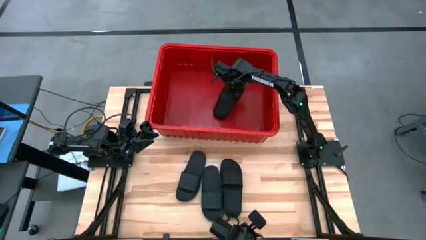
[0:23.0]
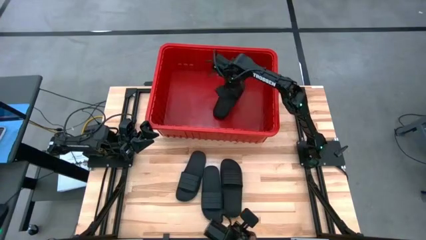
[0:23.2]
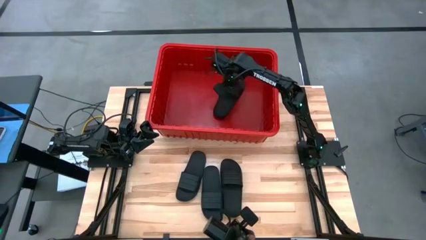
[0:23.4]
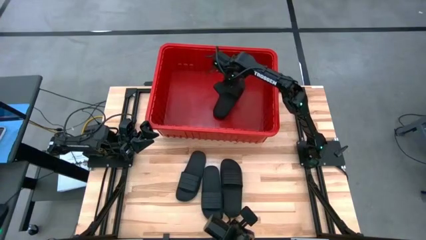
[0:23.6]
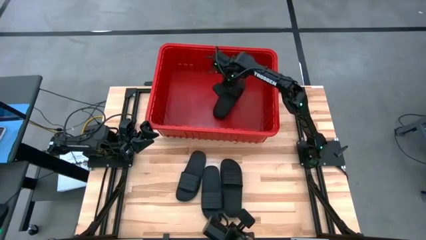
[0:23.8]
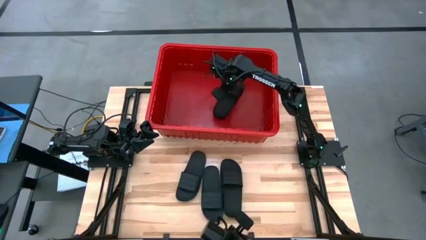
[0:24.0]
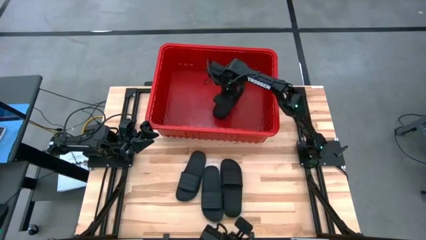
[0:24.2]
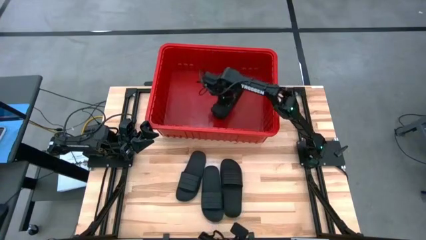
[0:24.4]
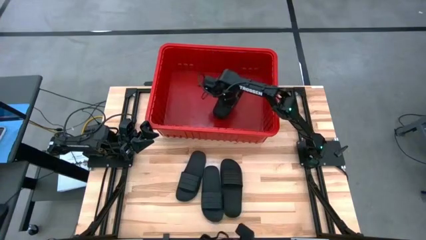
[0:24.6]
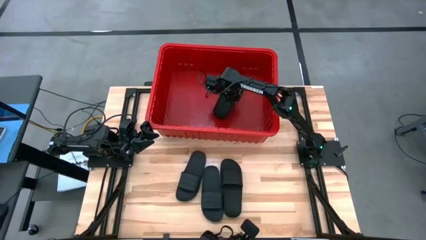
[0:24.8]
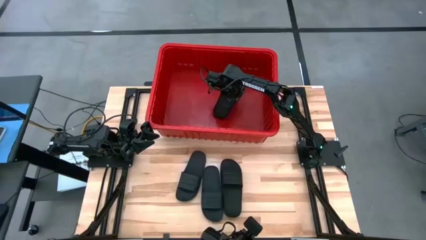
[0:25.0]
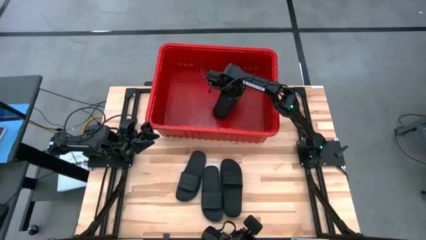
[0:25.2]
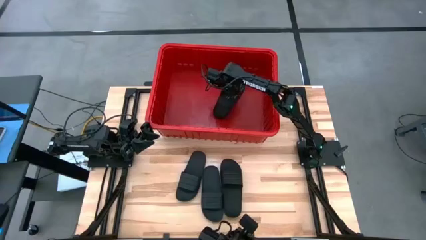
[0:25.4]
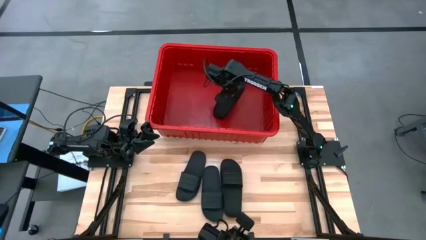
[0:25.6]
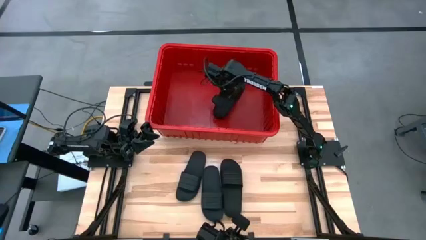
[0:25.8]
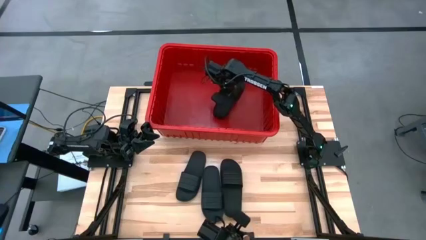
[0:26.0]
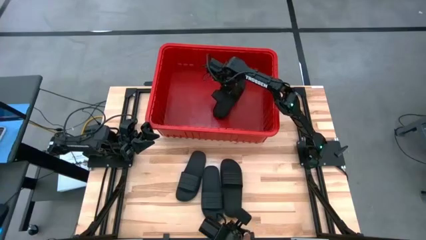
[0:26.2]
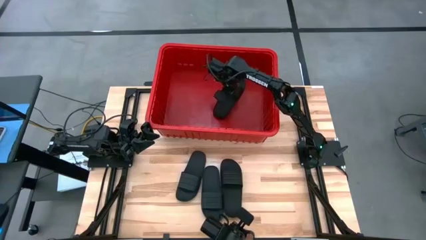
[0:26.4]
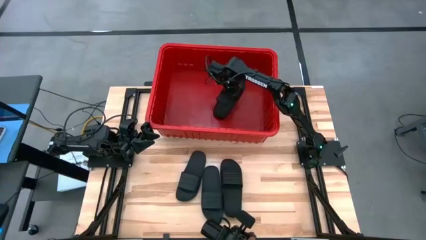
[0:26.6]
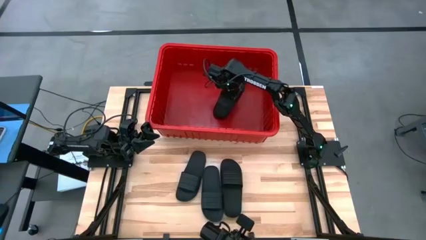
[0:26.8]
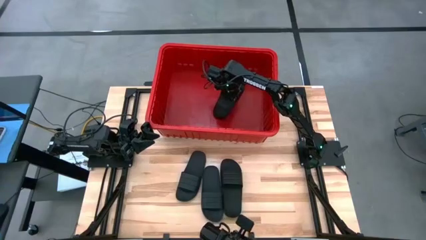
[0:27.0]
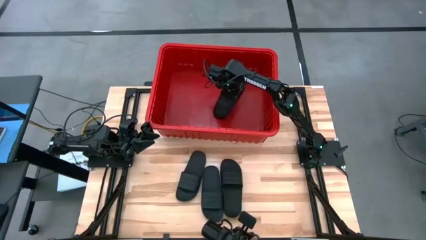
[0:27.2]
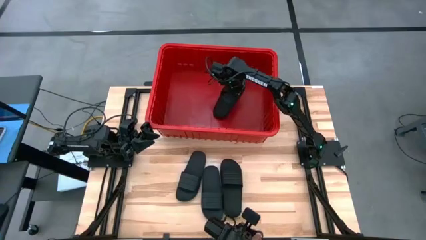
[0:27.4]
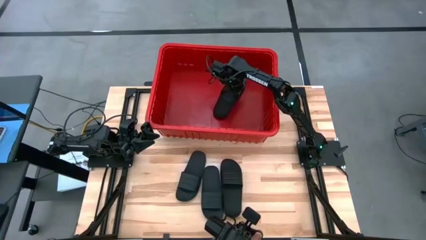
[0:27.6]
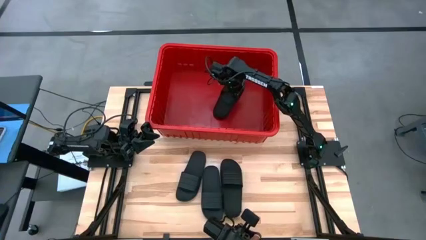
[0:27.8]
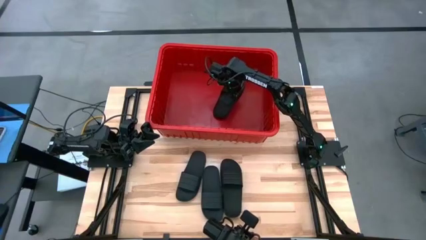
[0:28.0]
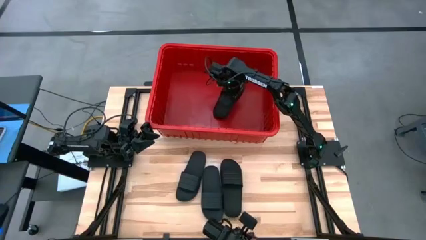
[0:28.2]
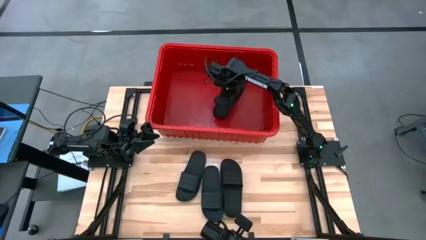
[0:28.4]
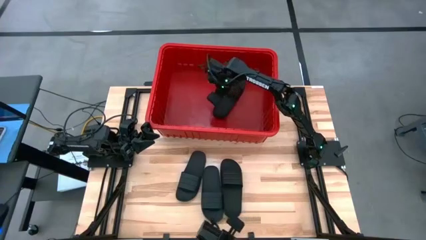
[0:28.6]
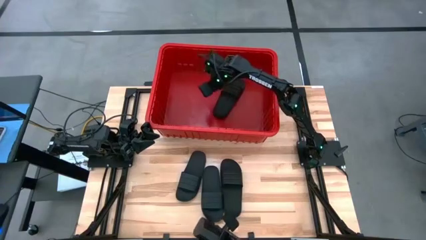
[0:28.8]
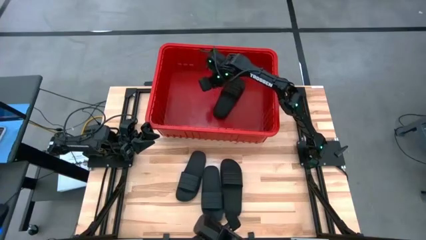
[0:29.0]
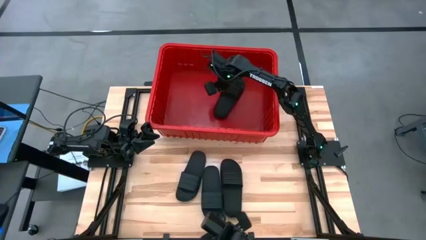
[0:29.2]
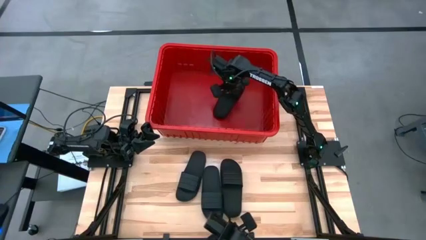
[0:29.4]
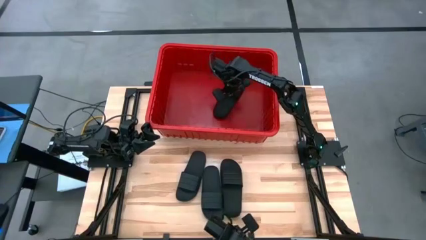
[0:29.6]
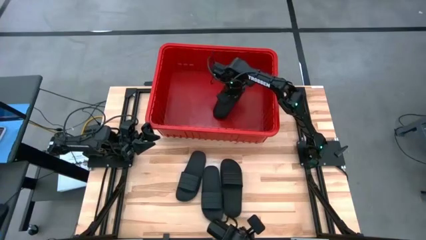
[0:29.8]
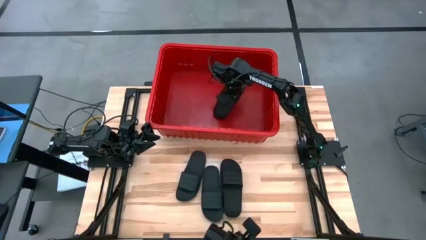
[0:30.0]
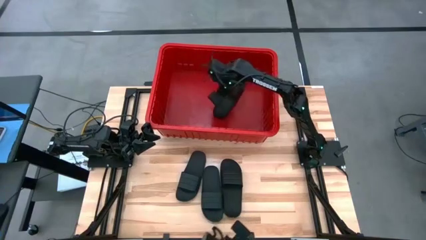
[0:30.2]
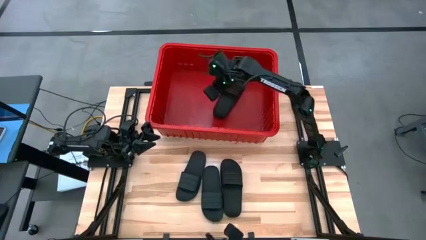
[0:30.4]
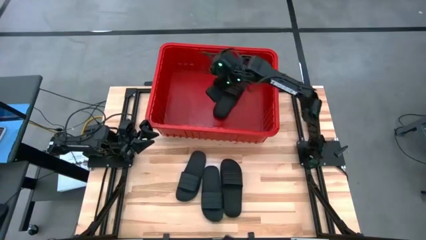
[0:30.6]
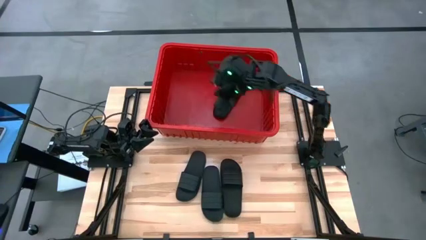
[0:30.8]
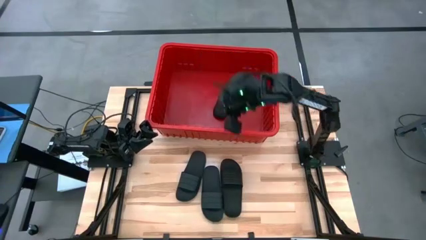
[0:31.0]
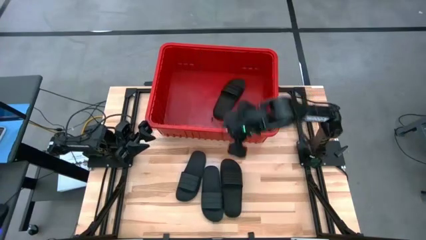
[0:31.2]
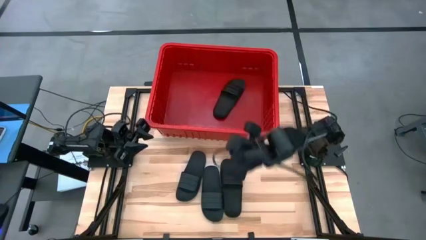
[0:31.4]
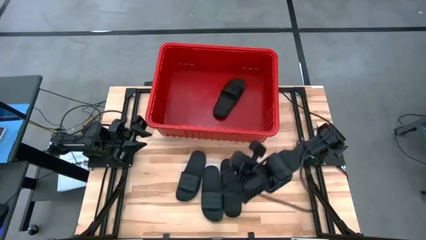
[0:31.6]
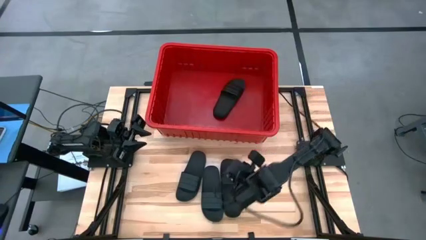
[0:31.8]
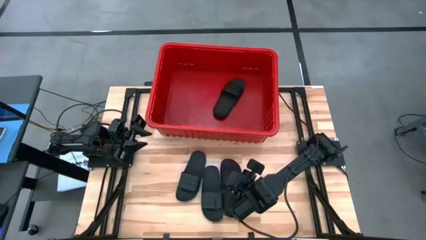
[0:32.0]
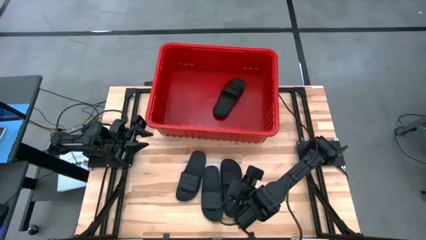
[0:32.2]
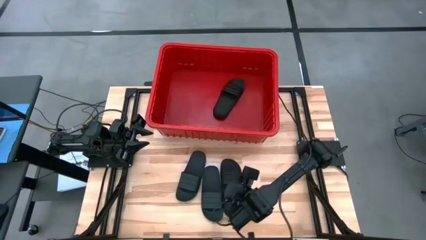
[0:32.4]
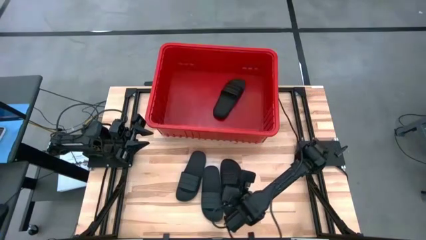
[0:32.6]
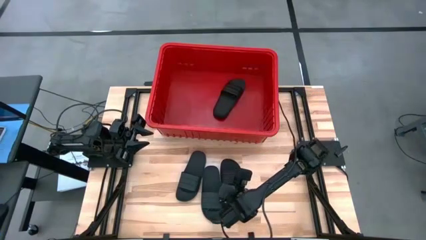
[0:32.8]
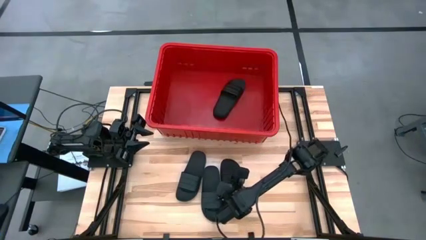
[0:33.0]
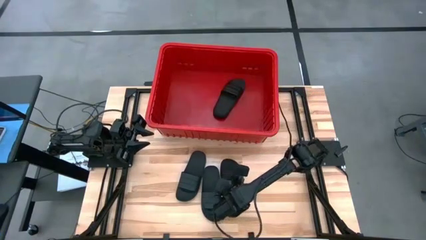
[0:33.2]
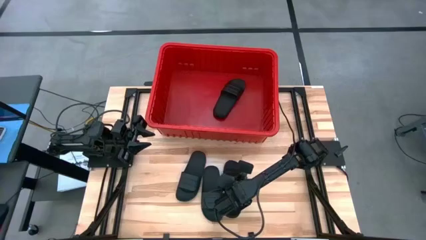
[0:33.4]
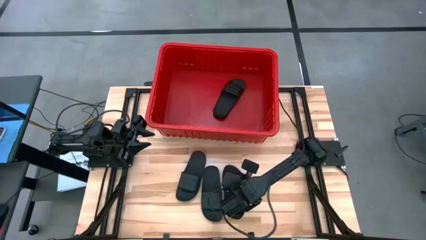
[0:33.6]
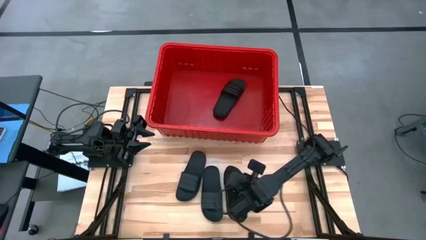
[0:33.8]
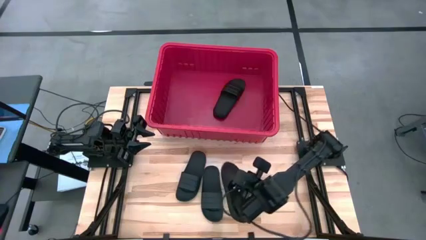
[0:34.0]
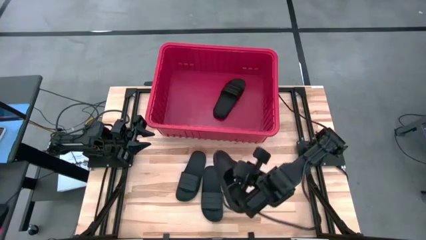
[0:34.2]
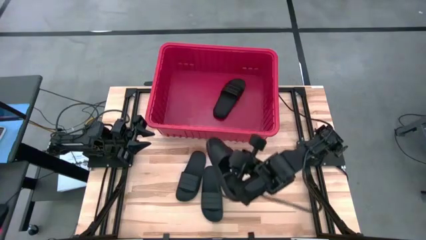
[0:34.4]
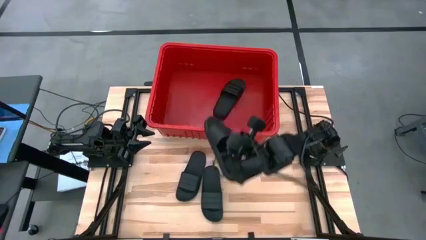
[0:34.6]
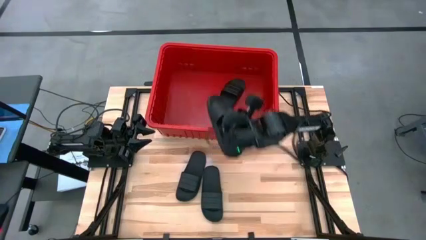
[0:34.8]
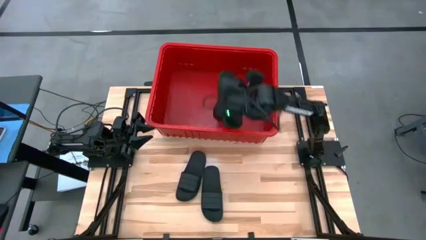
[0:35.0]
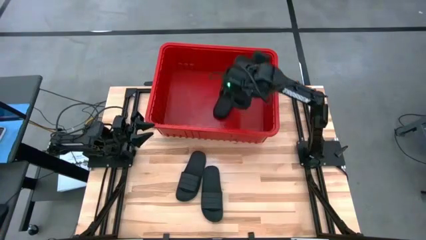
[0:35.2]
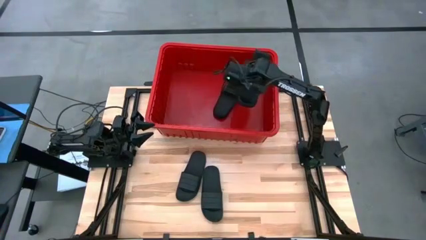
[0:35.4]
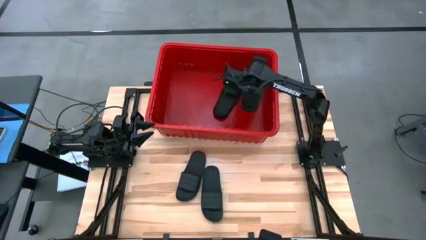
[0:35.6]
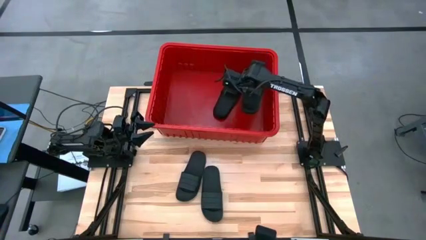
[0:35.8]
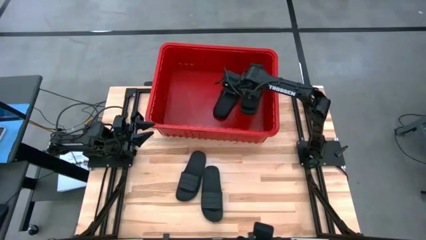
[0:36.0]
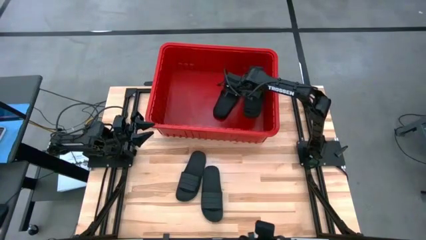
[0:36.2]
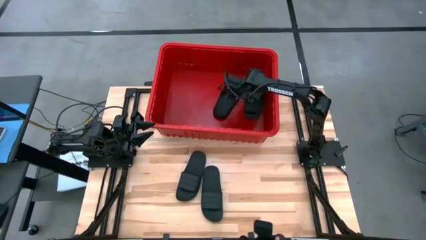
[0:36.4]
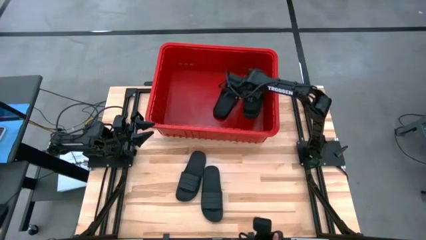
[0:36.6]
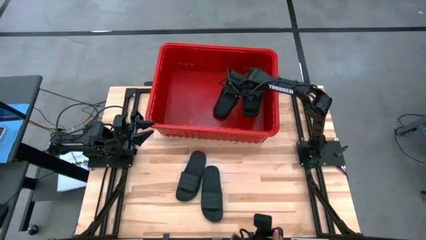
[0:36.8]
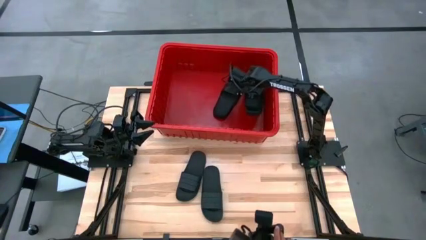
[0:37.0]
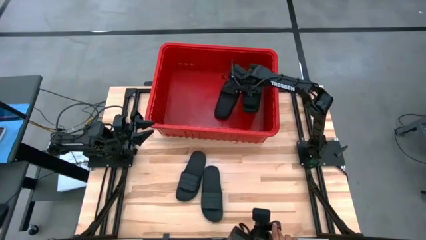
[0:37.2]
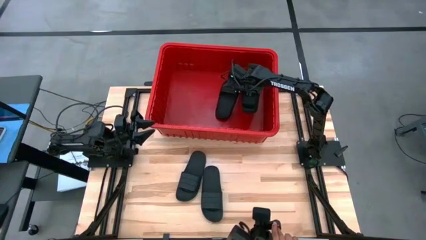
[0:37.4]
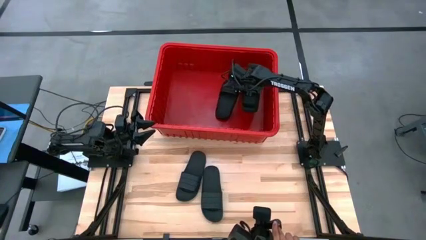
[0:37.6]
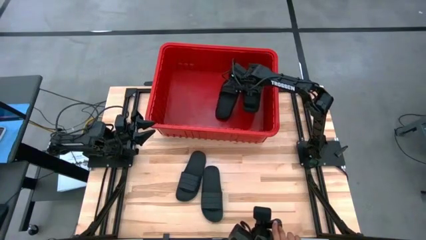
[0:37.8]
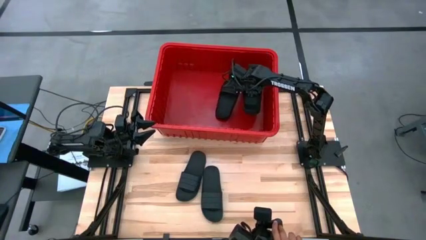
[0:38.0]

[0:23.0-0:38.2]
Task: Pick and place slides into bin
Put the black slide into the red bin

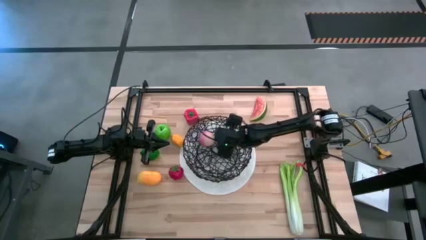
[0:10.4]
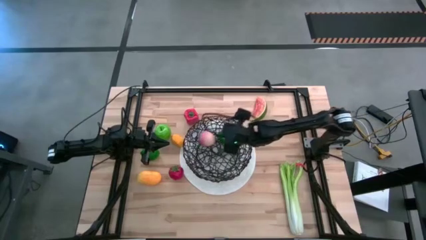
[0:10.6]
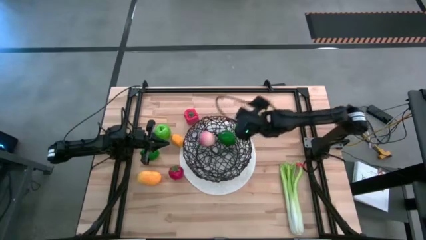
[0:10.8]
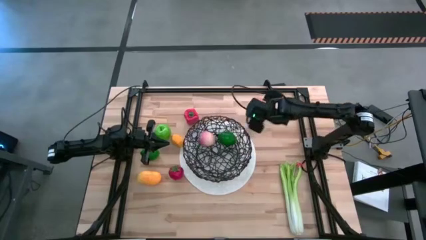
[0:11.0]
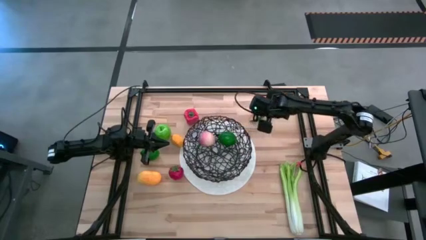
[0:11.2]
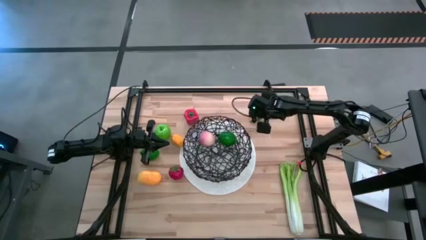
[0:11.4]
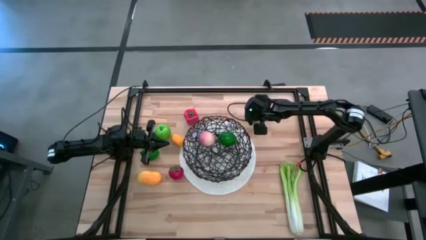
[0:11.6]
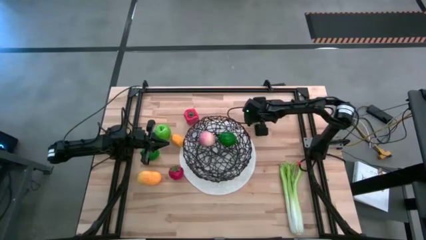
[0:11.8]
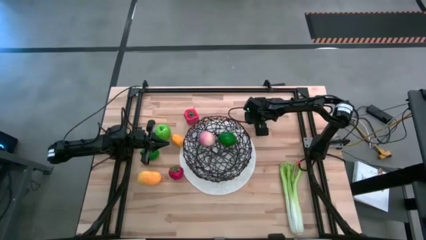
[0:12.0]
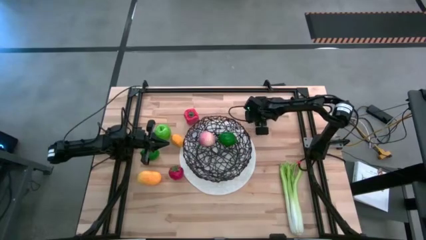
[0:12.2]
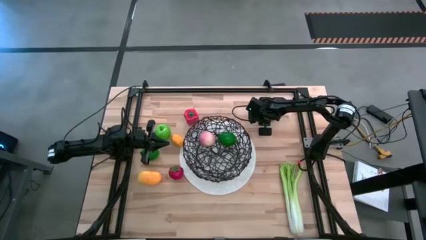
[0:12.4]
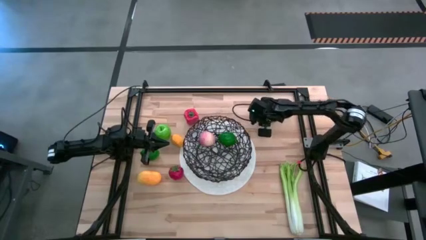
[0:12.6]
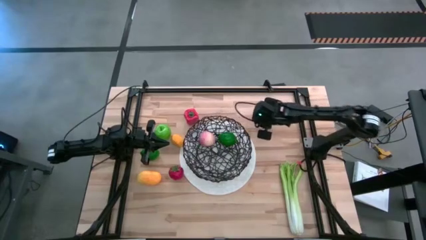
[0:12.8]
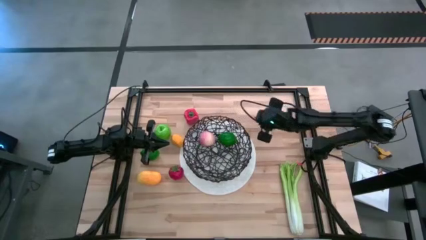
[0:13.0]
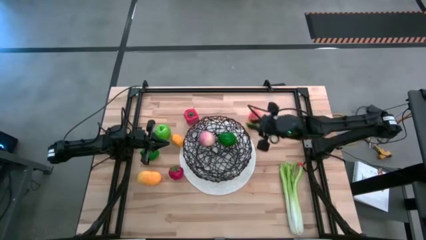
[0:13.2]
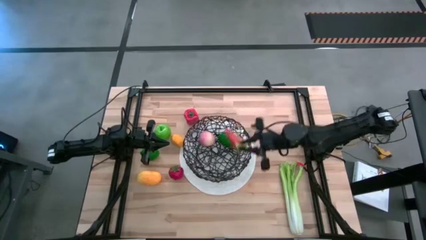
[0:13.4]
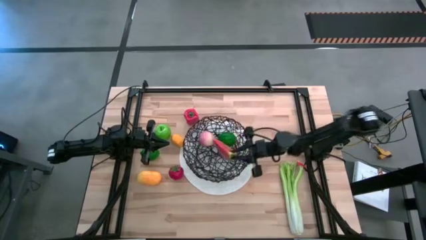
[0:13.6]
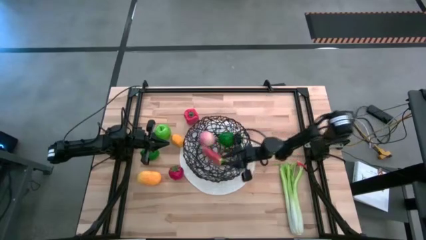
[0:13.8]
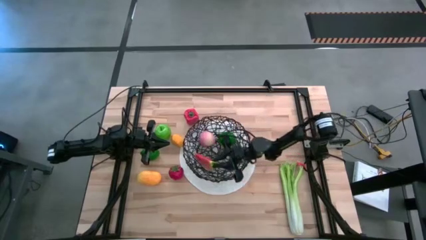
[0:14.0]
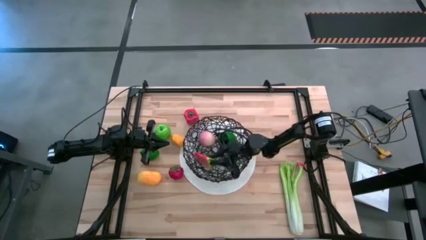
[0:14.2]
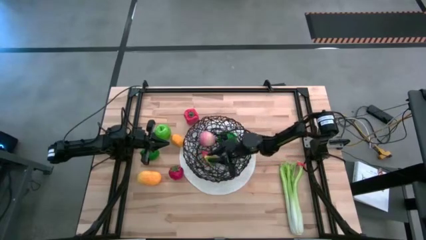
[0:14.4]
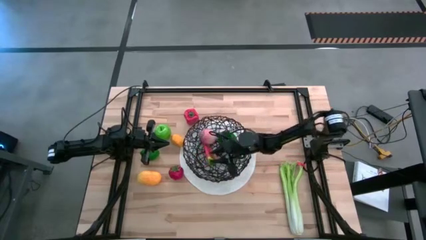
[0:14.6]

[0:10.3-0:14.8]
Task: Build produce basket
Put the watermelon into the wire basket
